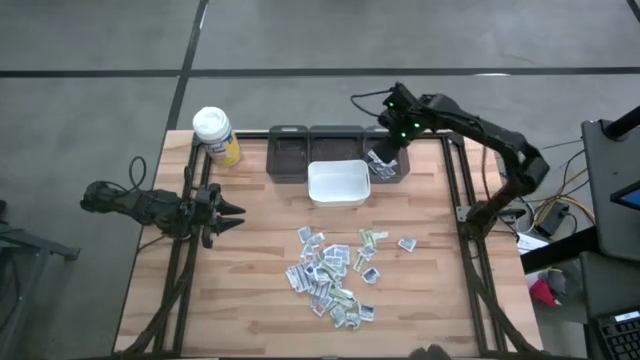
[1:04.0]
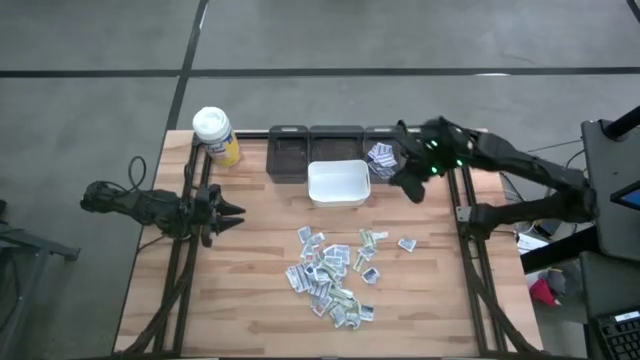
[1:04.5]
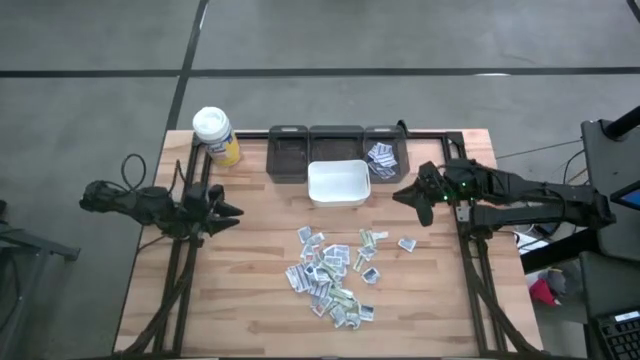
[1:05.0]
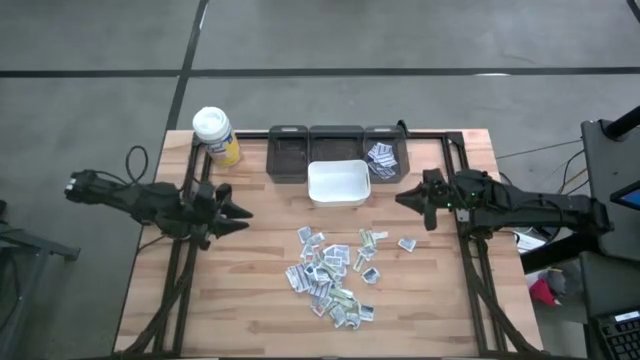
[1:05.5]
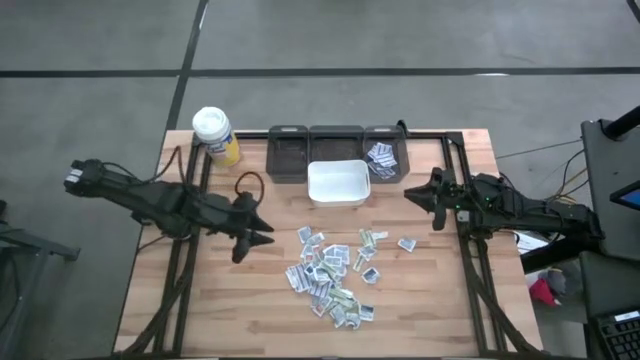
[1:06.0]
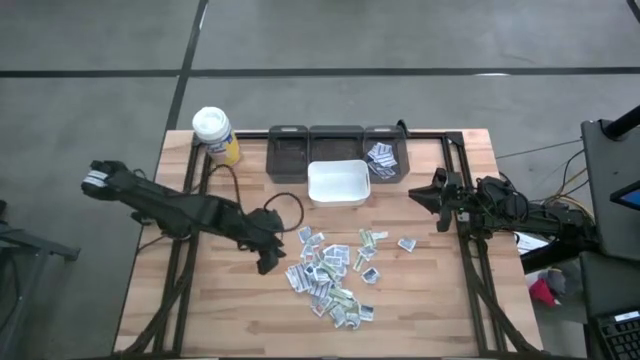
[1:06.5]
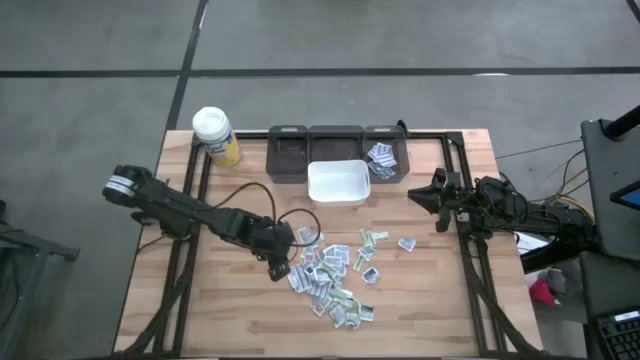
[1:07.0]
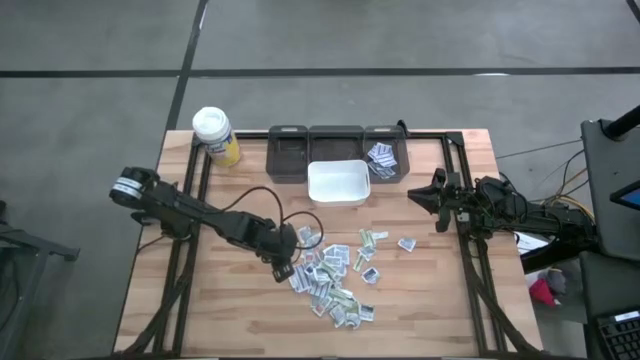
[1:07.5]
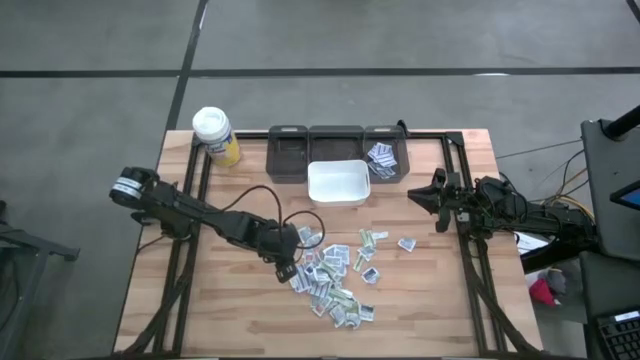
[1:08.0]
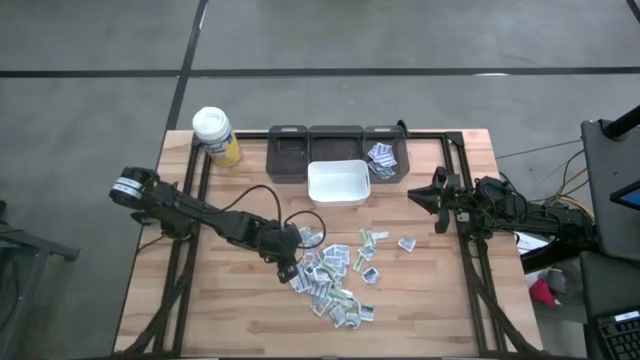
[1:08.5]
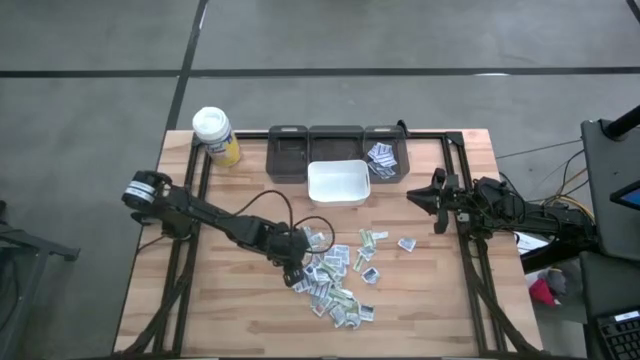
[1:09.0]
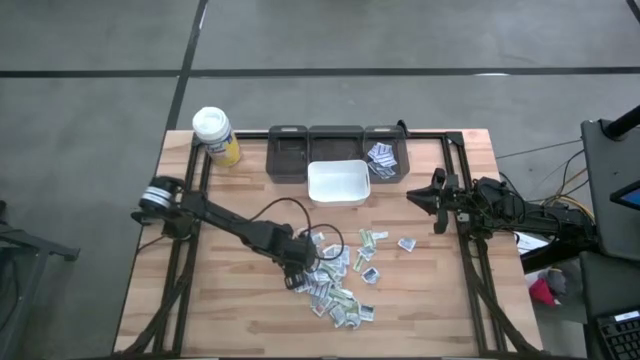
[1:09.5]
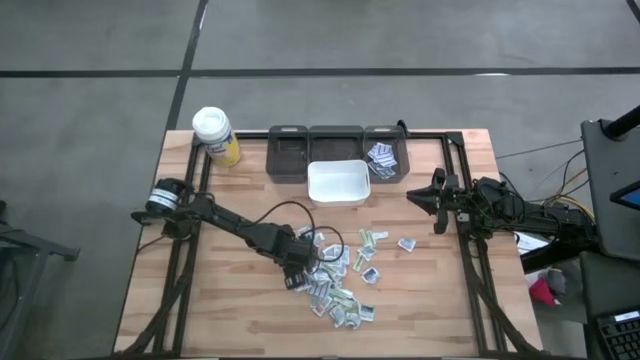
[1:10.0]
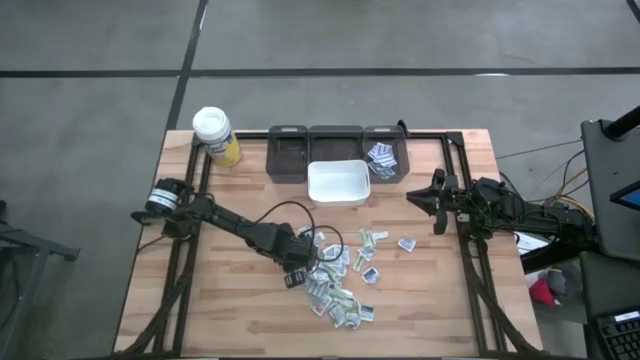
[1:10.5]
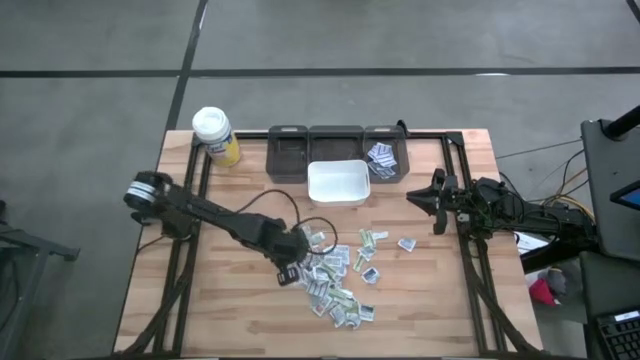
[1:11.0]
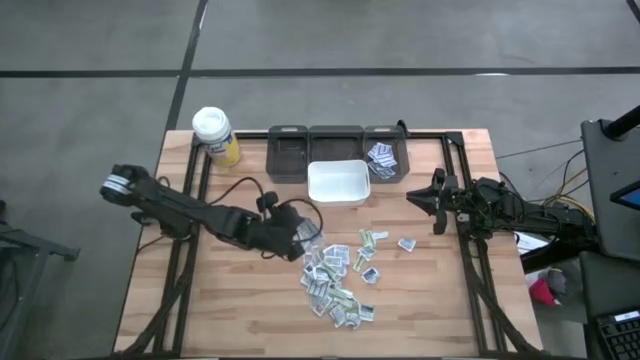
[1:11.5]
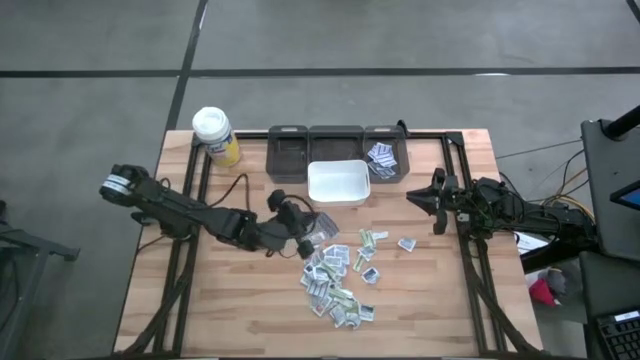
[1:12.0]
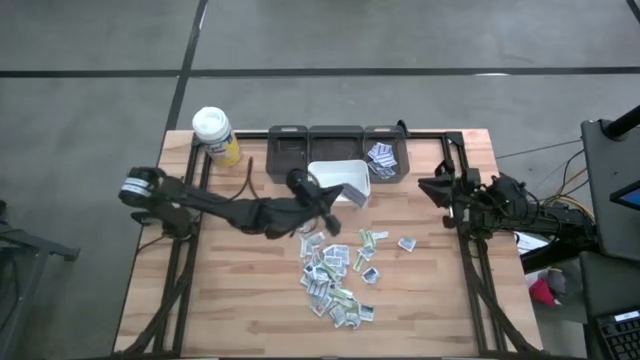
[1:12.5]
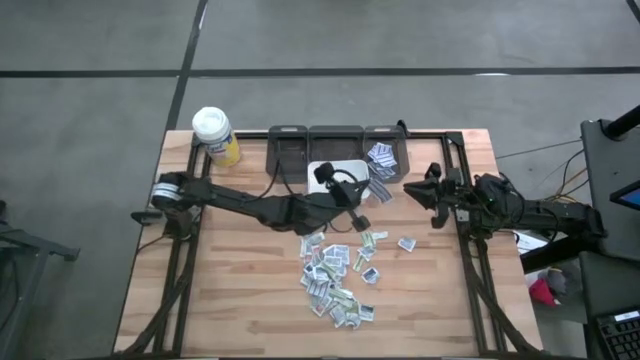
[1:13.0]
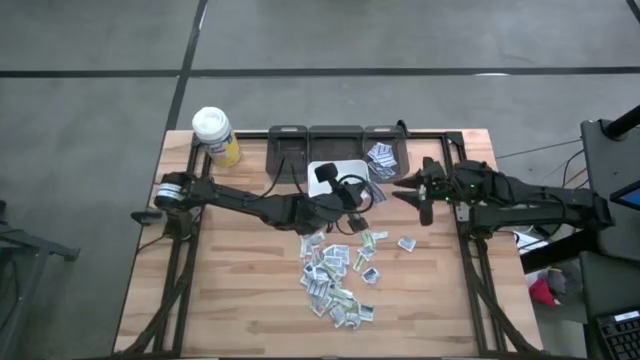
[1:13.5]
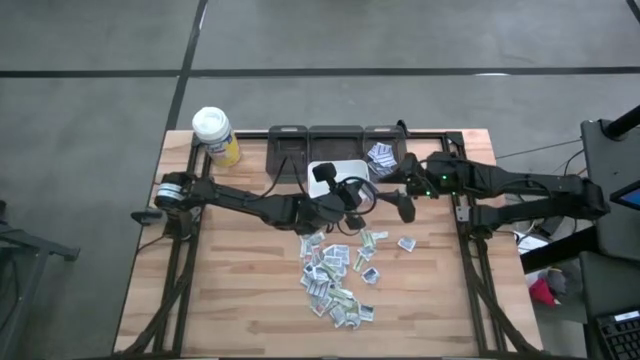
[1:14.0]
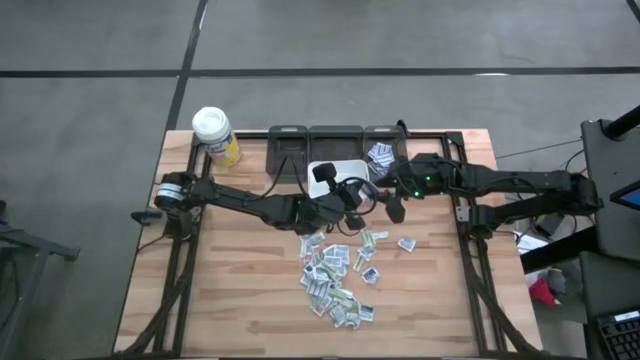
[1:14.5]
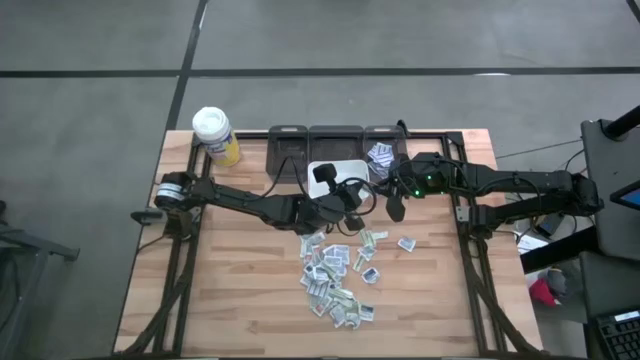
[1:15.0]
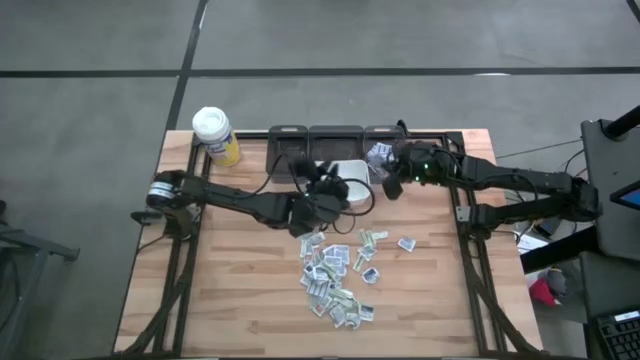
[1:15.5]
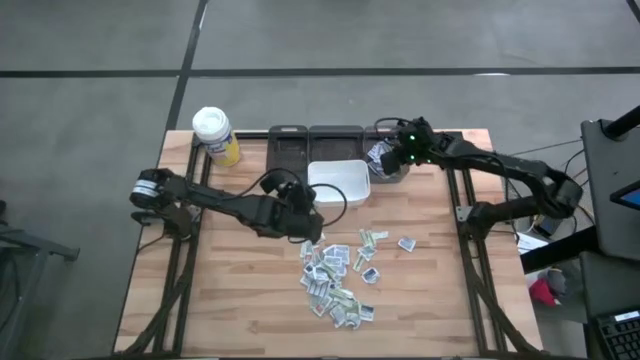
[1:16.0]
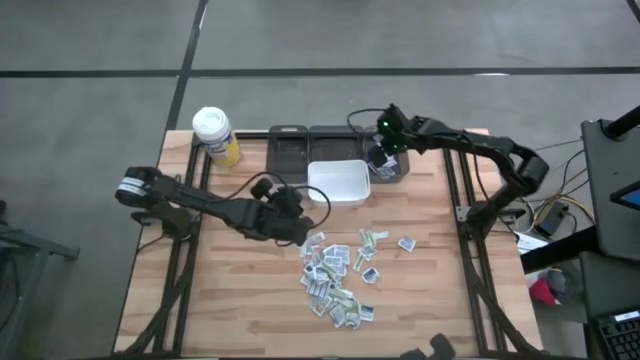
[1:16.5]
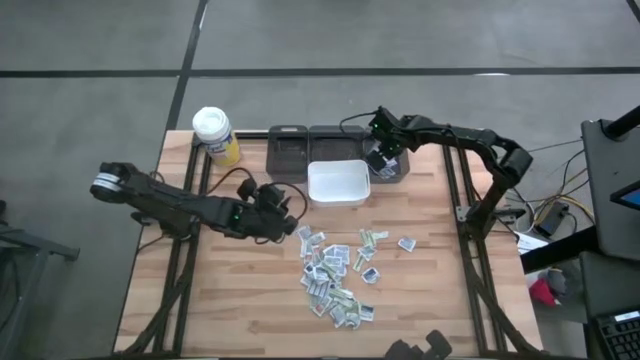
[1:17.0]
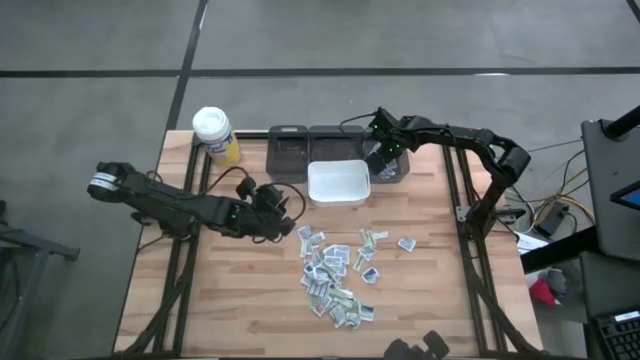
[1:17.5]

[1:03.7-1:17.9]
Task: Pick & Place First Aid Supplies
Put the left blue bandage pack into the right black bin

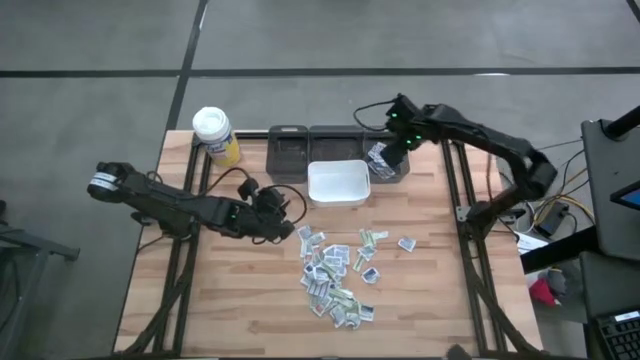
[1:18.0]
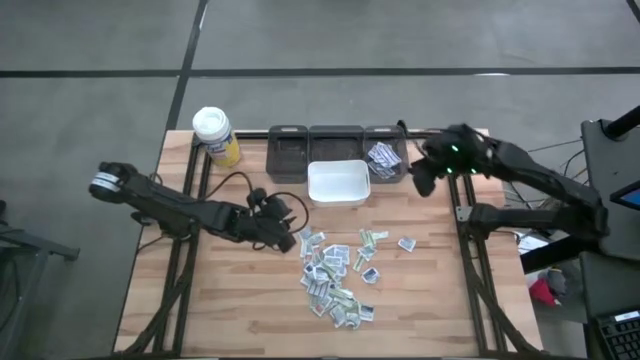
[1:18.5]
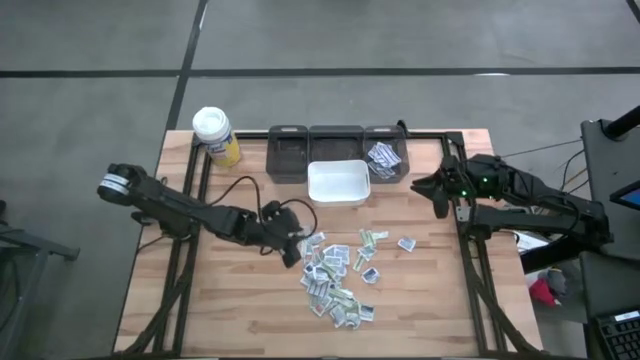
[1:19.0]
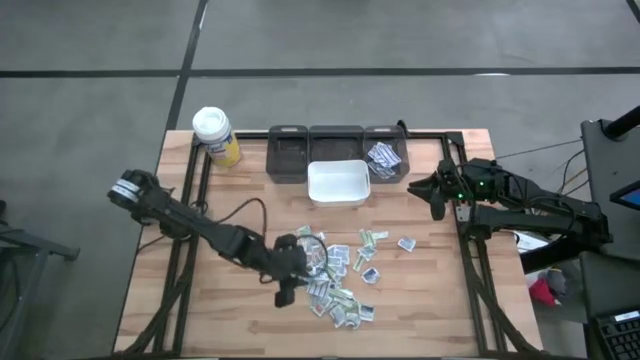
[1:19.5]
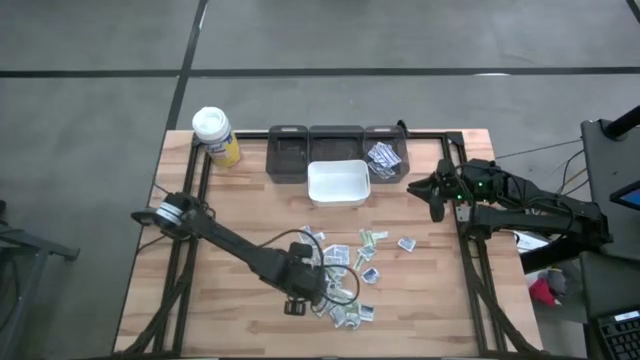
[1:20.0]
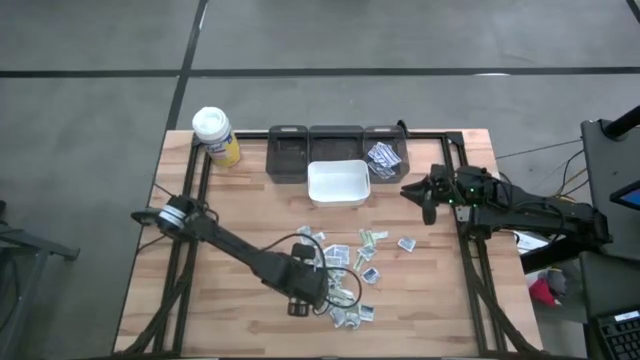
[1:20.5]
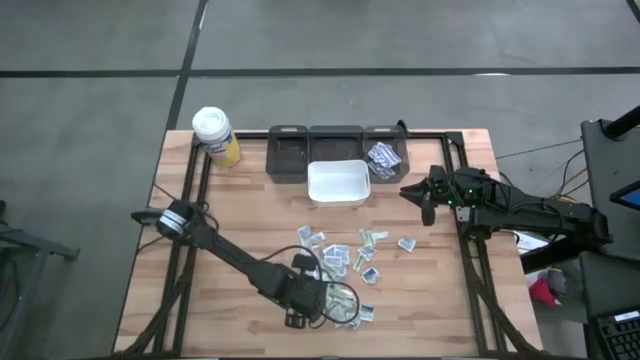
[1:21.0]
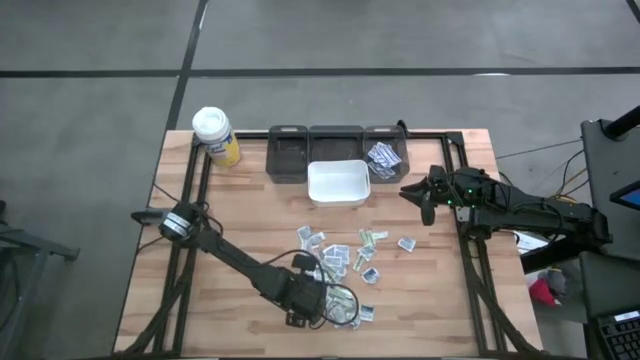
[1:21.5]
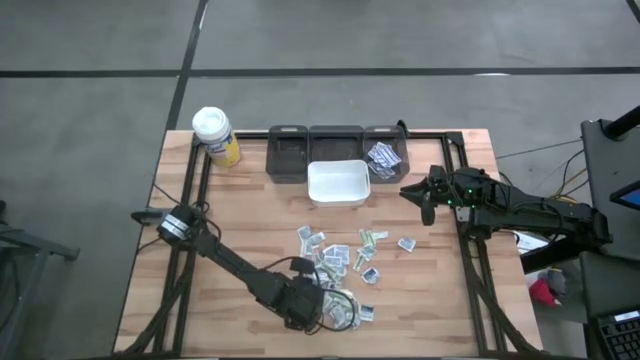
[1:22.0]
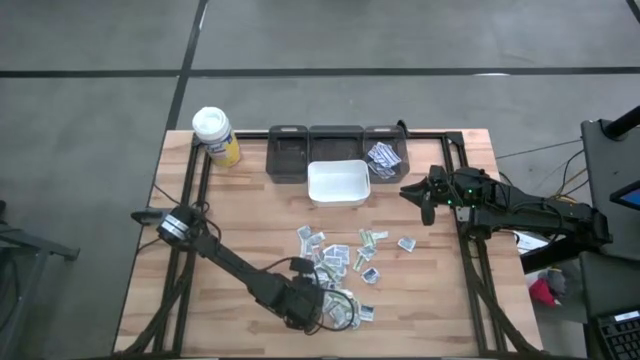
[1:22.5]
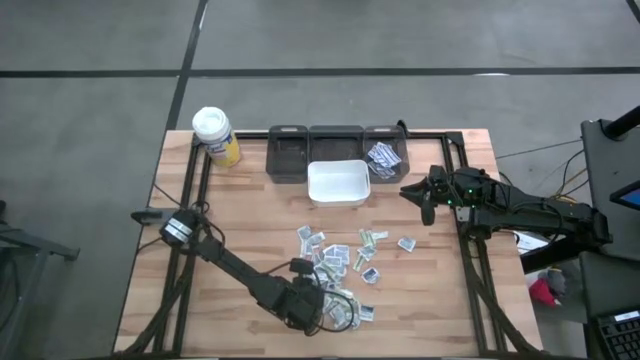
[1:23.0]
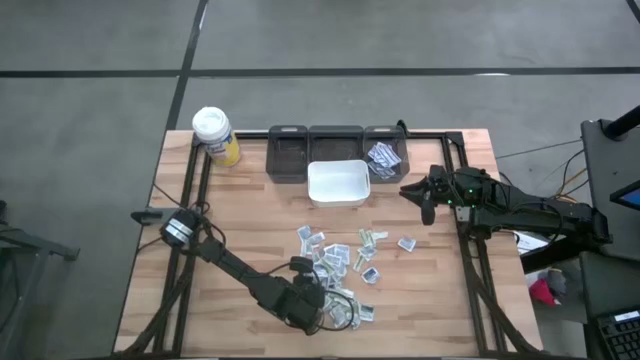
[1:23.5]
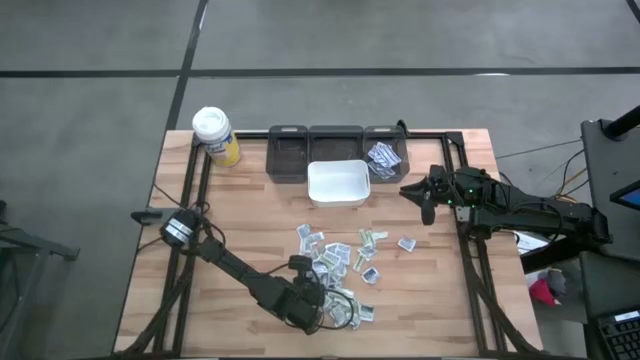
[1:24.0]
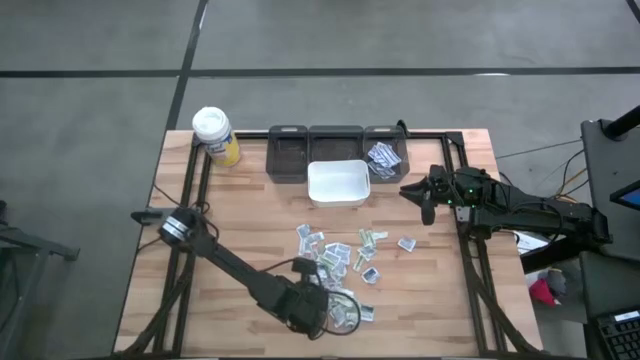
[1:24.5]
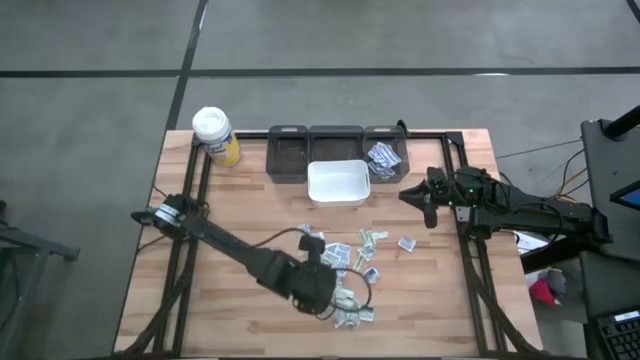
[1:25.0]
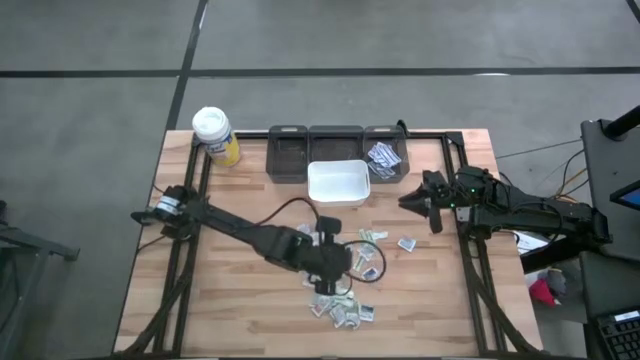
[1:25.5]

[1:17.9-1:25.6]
Put the blue bandage pack into the right black bin
